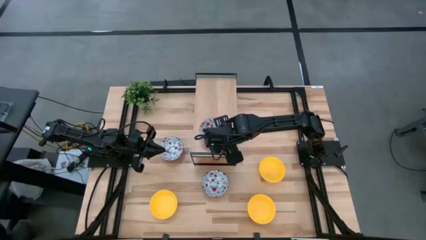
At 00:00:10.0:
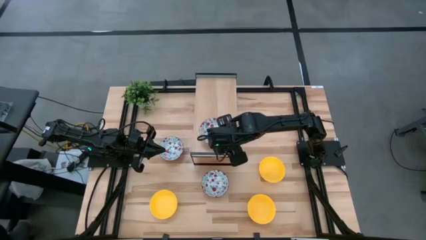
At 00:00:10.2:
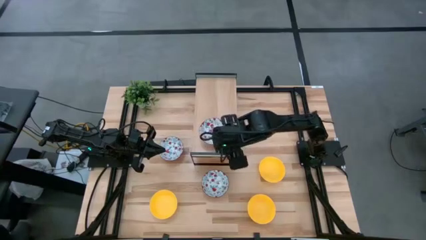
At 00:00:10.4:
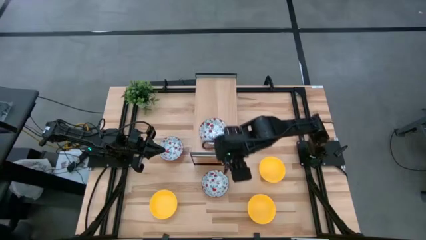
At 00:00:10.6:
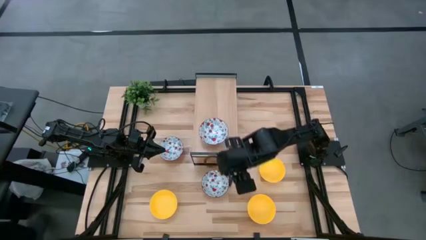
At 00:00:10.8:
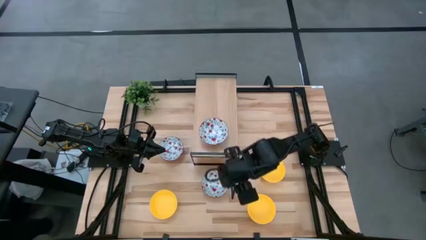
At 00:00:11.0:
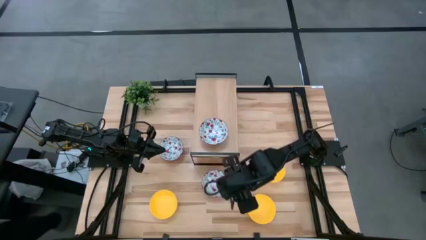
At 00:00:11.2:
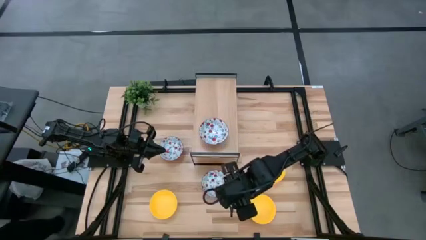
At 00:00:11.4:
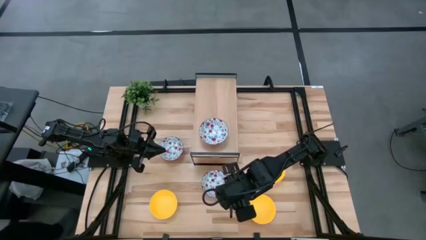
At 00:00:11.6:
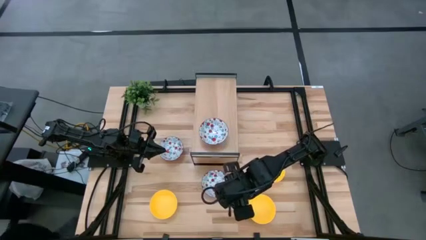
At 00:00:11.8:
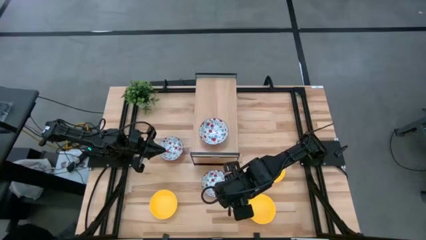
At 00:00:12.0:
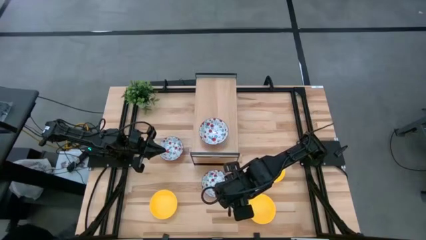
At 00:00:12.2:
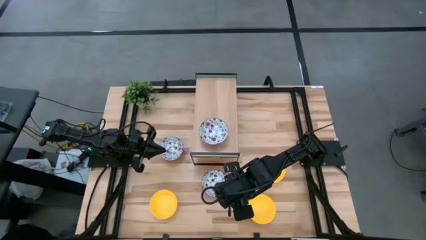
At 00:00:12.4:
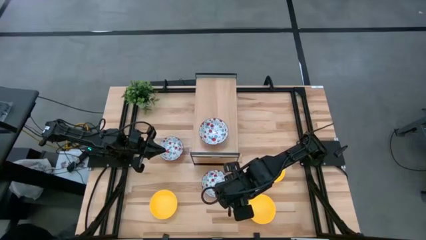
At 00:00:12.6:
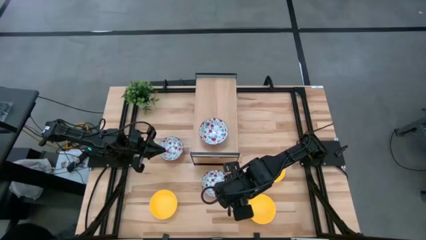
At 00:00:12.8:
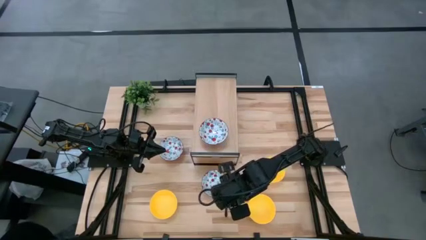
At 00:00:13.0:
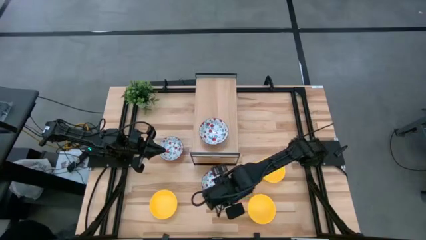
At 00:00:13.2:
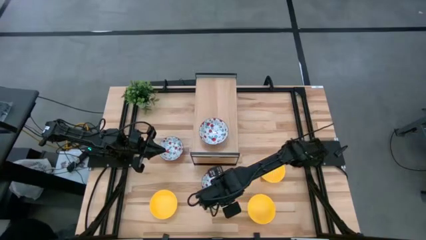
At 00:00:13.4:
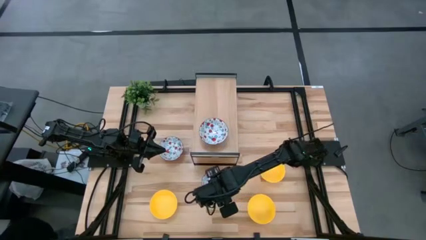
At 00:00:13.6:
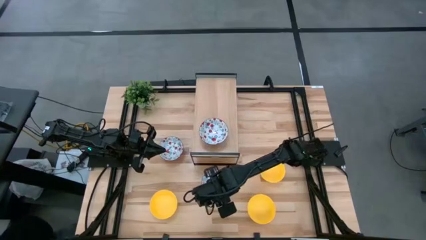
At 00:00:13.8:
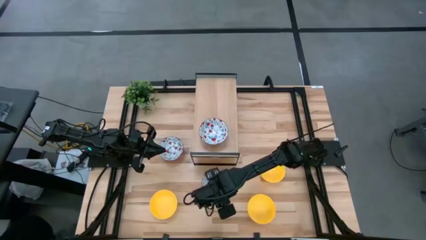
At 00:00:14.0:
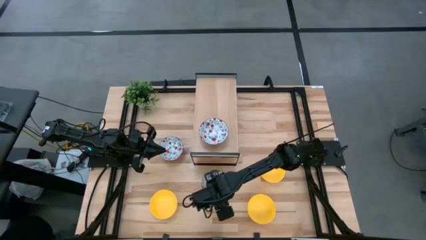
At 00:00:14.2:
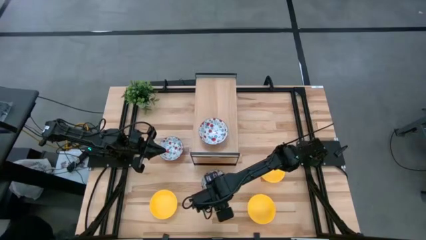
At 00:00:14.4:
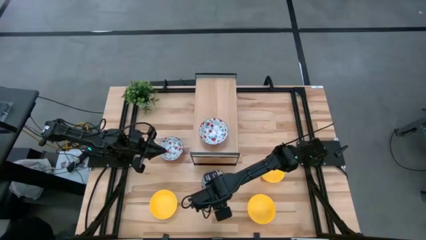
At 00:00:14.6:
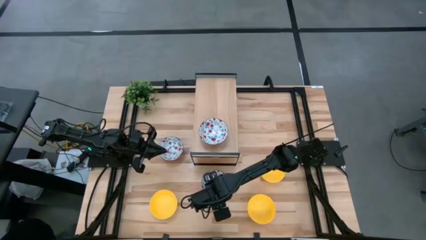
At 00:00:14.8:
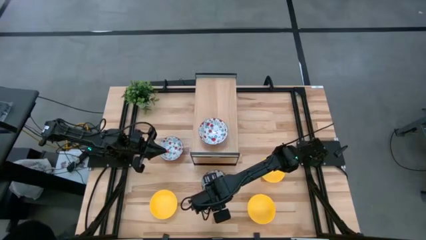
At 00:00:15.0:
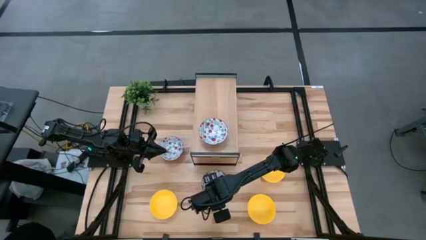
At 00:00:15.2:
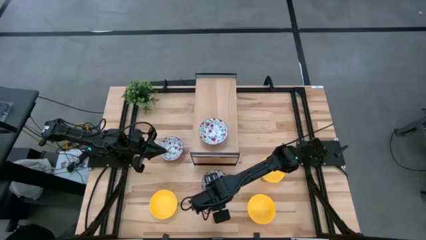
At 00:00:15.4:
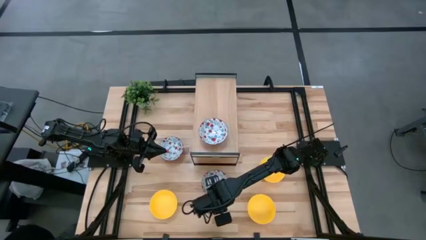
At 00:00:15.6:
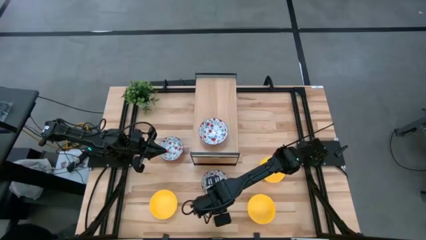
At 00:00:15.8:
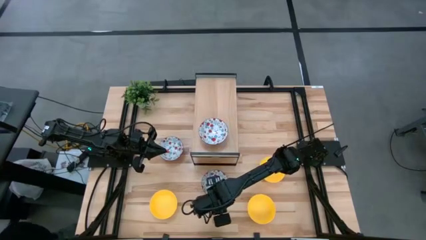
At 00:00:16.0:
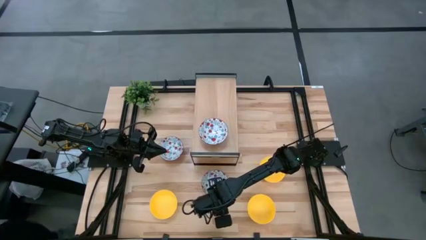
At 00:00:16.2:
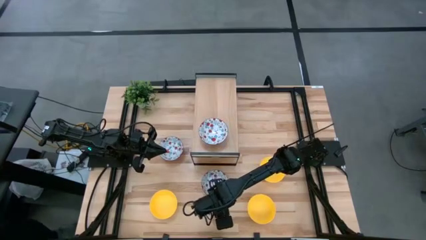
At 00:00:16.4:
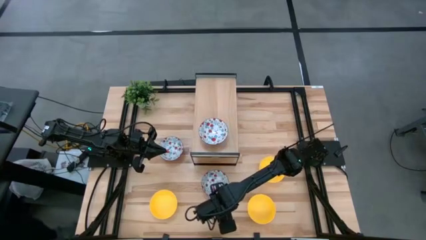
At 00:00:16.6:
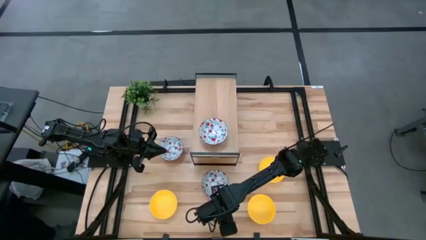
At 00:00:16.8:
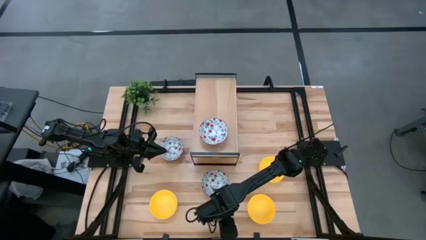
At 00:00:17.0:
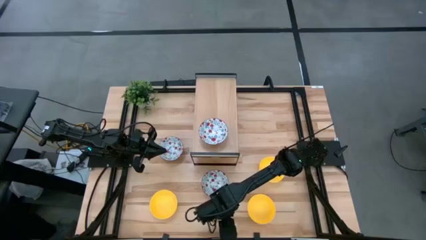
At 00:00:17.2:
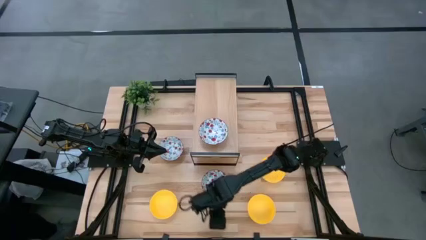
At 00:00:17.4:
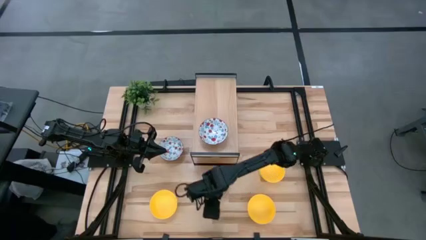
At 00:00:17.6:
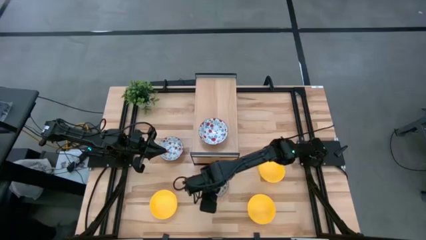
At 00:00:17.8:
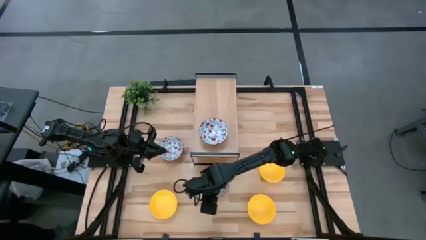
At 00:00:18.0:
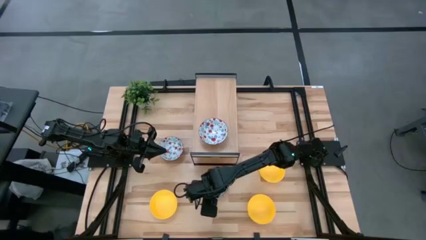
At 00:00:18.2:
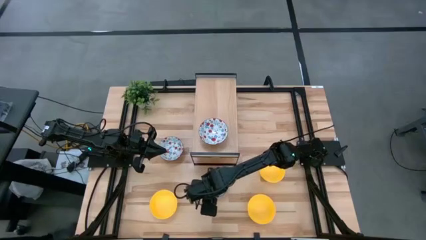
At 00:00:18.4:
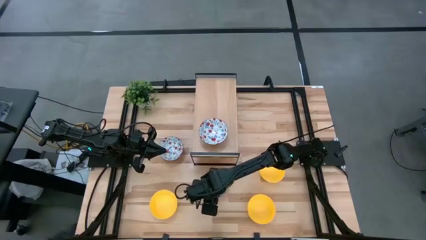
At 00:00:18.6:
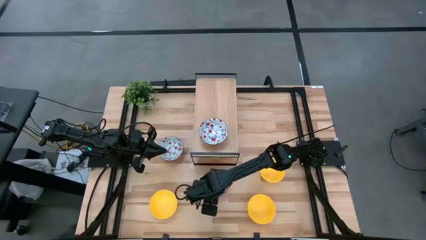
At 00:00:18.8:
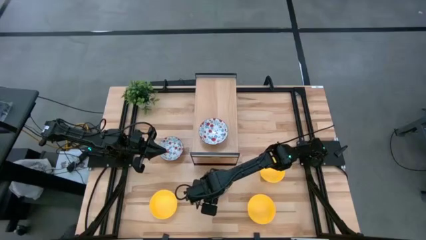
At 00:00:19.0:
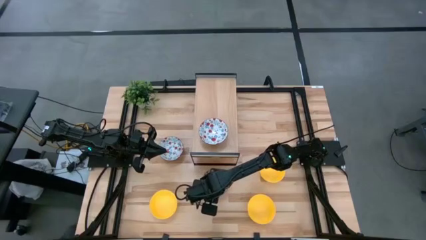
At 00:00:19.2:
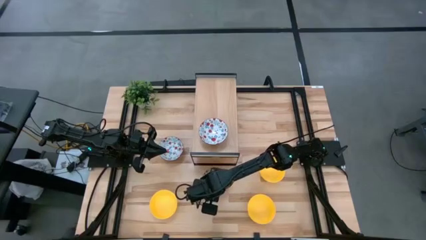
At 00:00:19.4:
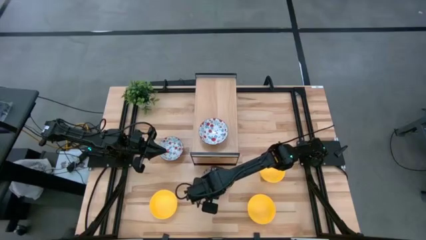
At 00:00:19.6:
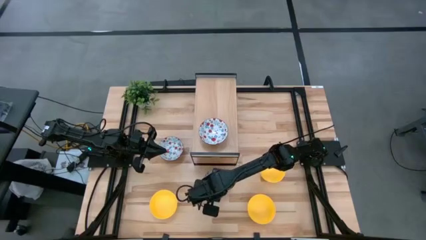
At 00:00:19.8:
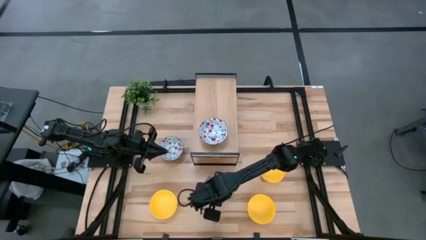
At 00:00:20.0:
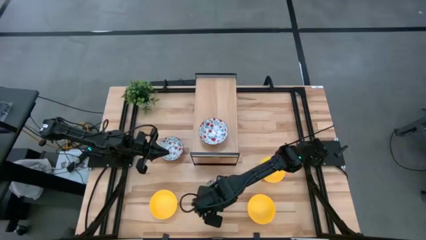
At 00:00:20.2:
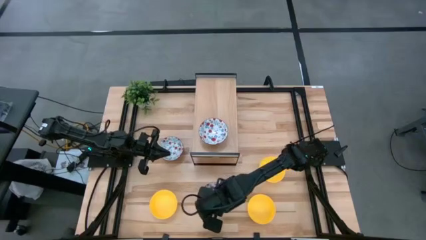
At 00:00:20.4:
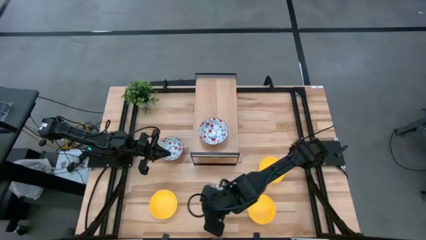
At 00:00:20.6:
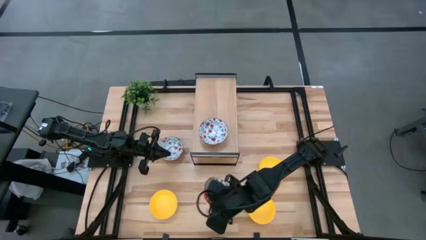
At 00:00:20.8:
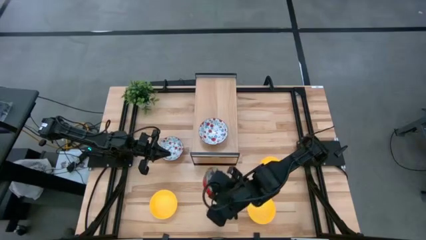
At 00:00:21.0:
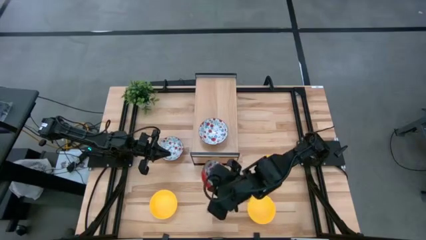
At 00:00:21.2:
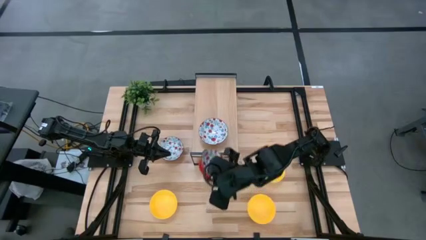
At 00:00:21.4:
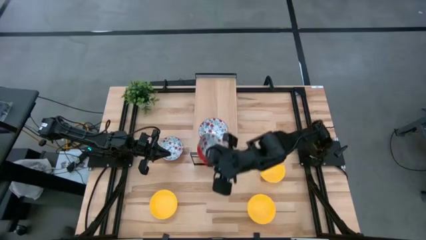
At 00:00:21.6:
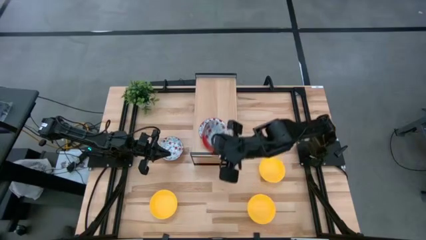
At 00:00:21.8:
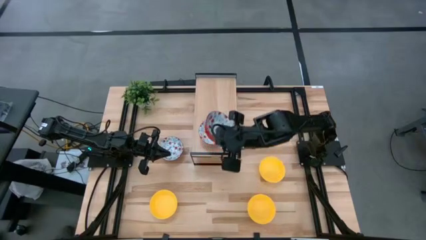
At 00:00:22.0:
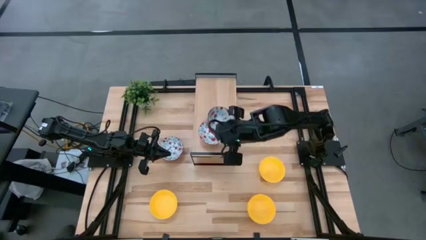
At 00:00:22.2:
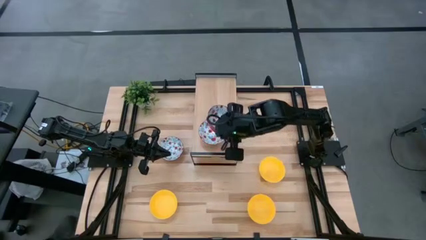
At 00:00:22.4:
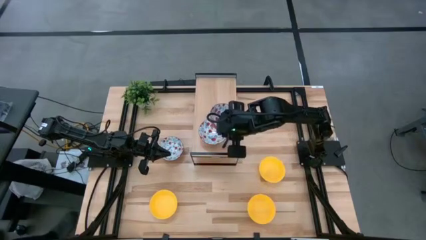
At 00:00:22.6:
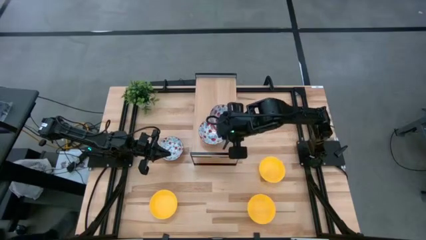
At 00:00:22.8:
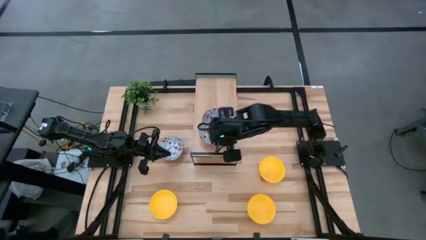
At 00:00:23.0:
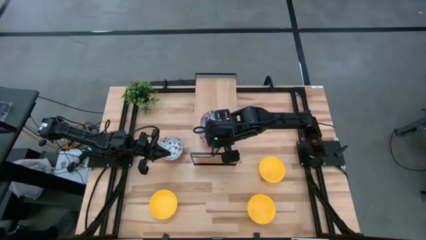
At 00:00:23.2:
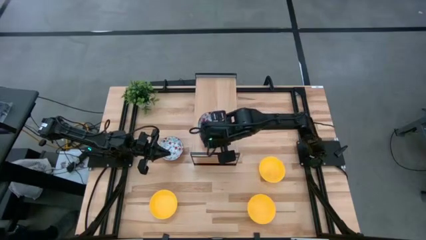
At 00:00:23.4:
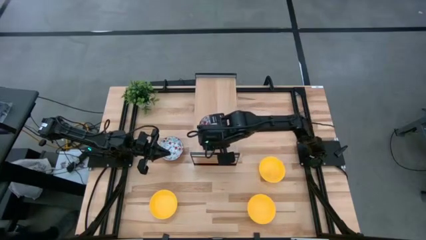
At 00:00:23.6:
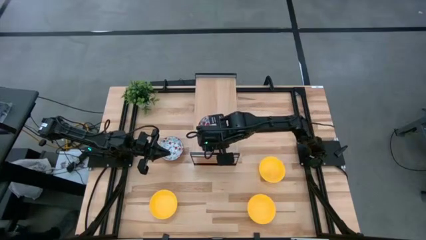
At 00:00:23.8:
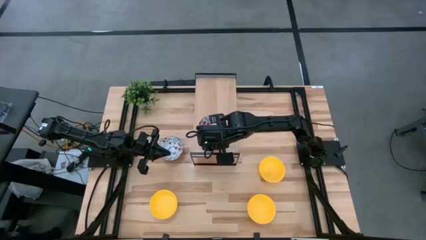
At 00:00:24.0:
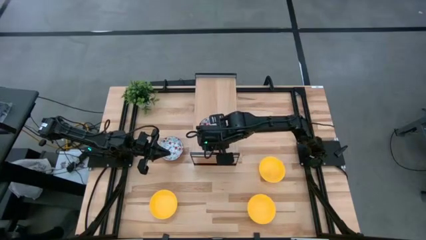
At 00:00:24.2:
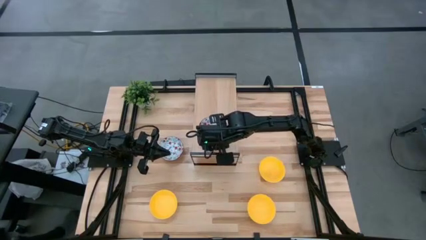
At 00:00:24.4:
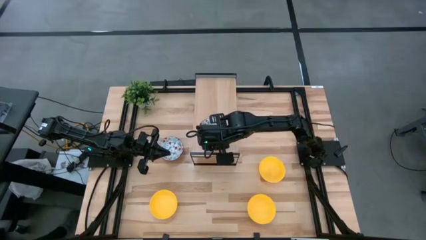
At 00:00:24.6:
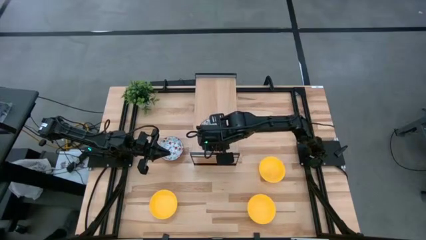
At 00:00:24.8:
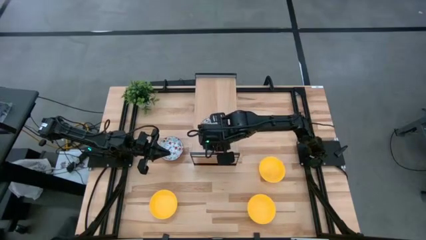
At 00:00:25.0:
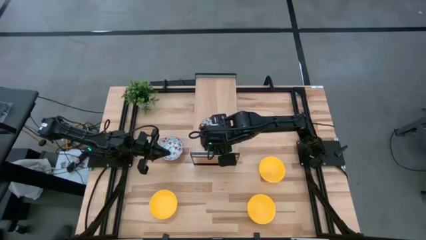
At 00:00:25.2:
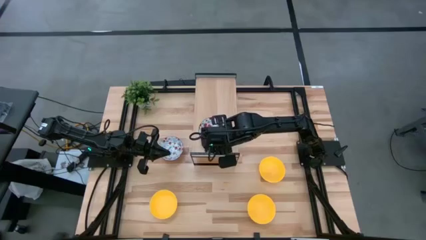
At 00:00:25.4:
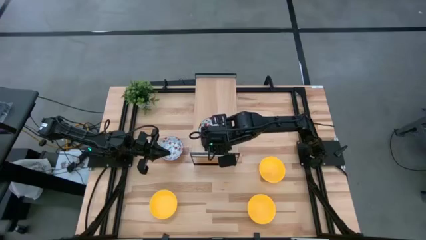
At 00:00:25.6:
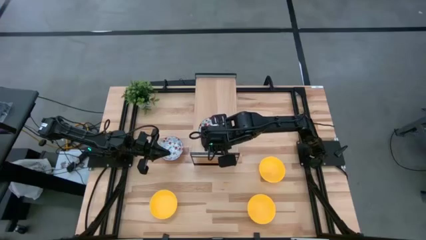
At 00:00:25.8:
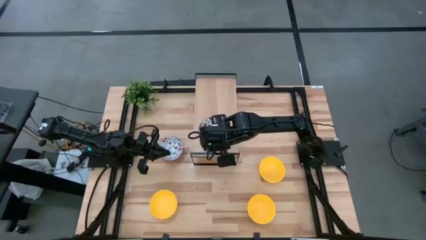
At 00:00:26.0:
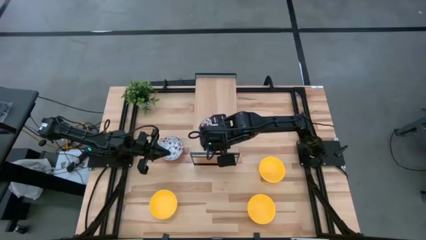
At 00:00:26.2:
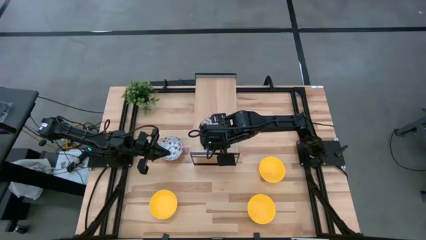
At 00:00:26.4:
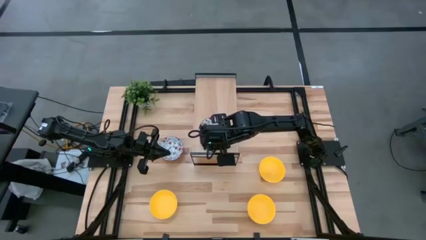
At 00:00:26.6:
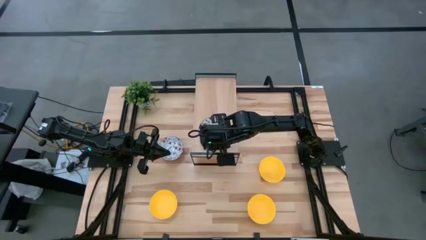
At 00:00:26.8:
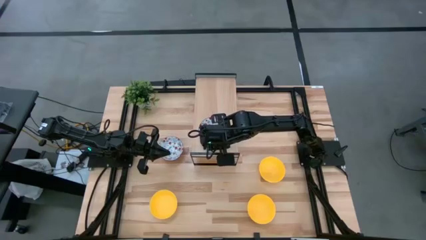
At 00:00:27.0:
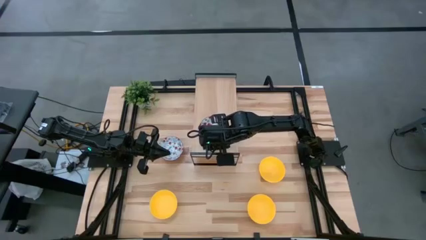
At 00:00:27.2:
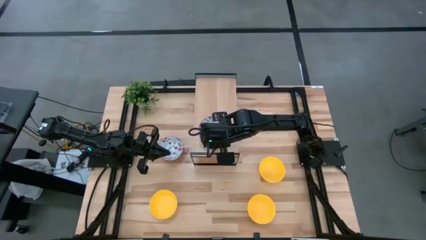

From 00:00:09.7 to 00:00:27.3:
Task: Pick & Place Mini bowls
Stack the bottom white patterned bowl on the white patterned bowl on the shelf
